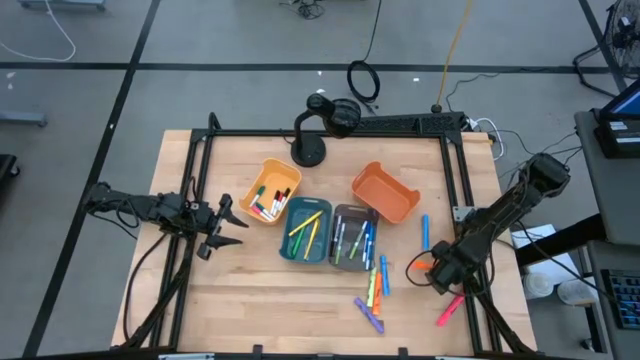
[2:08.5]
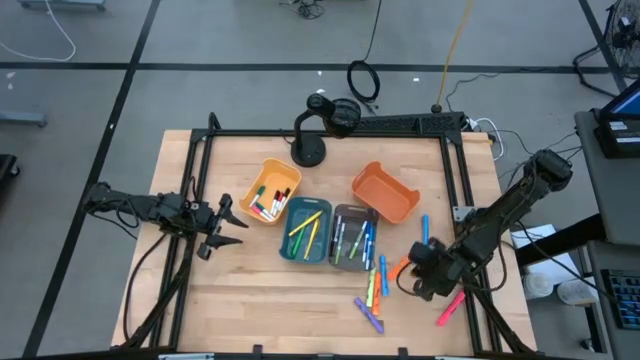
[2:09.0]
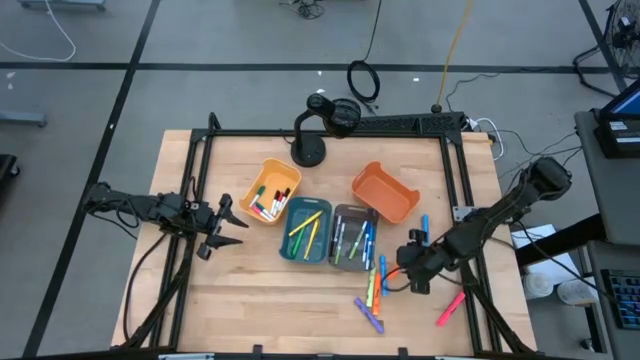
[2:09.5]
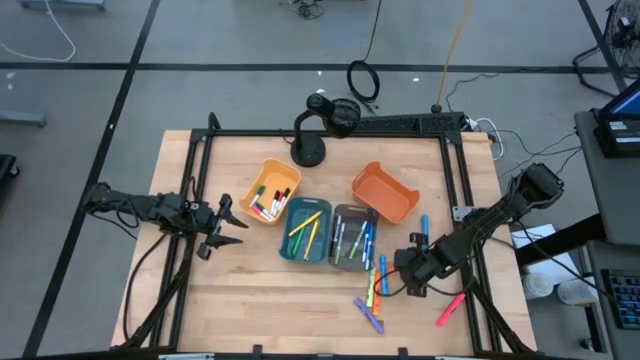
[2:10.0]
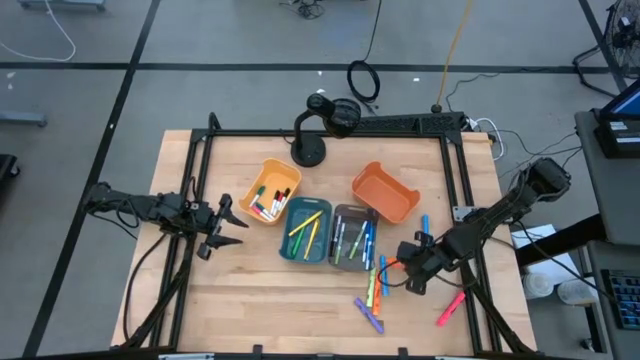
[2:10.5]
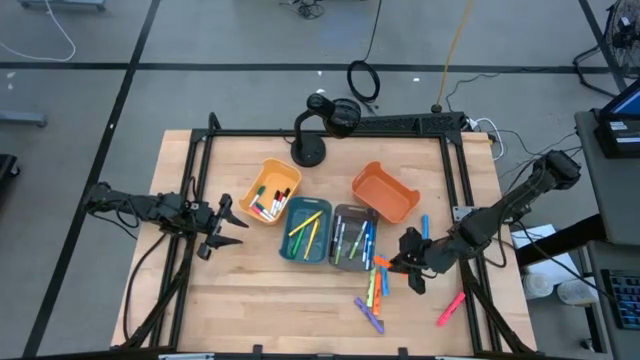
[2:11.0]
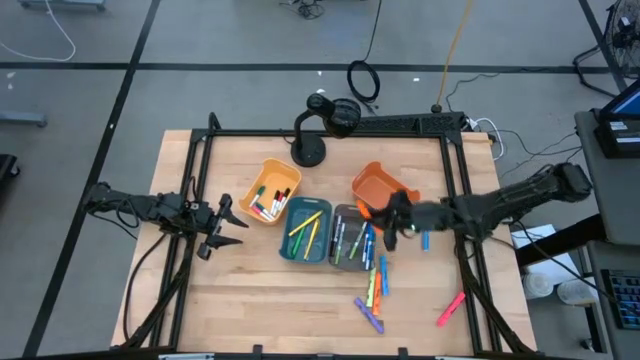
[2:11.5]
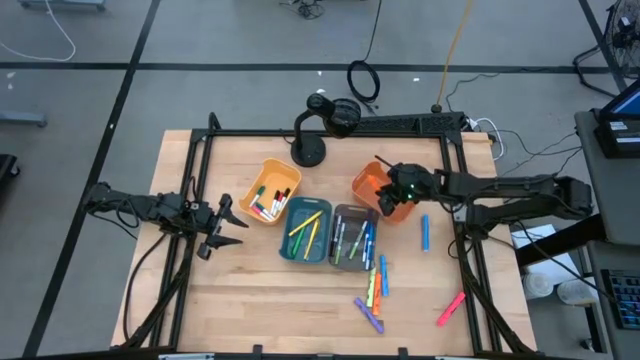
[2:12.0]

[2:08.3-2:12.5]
Task: Pick & Place Markers
Put the right orange highlighter into the orange bin

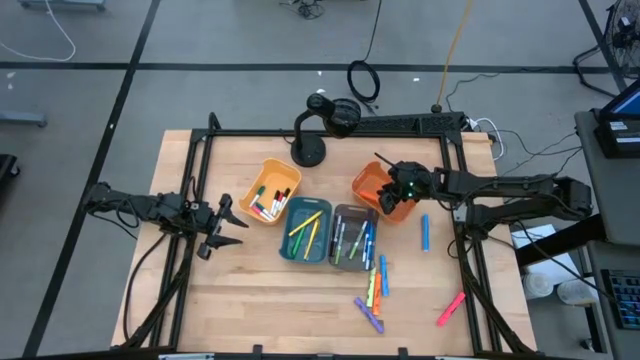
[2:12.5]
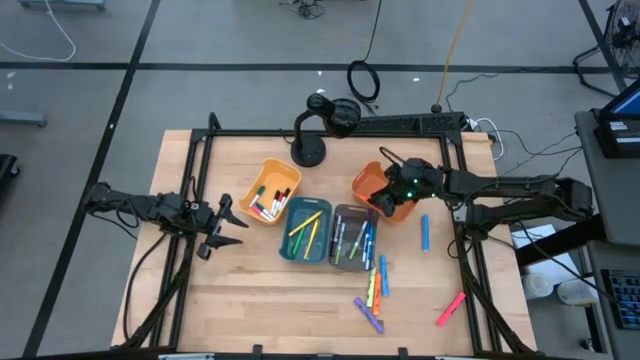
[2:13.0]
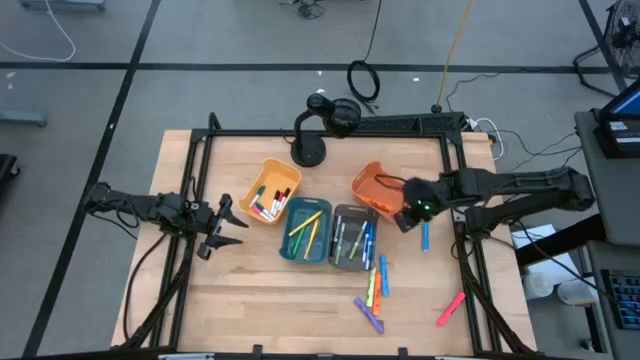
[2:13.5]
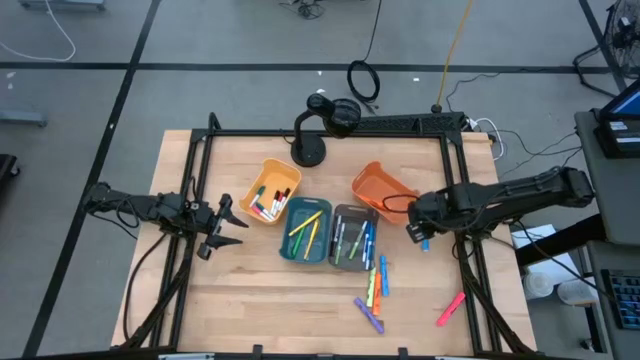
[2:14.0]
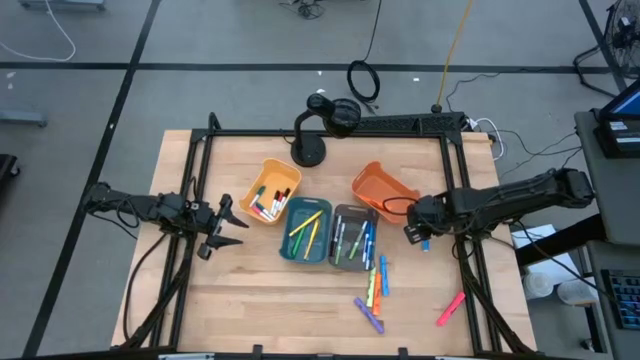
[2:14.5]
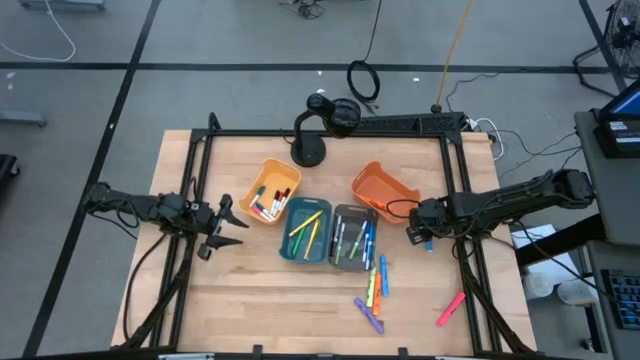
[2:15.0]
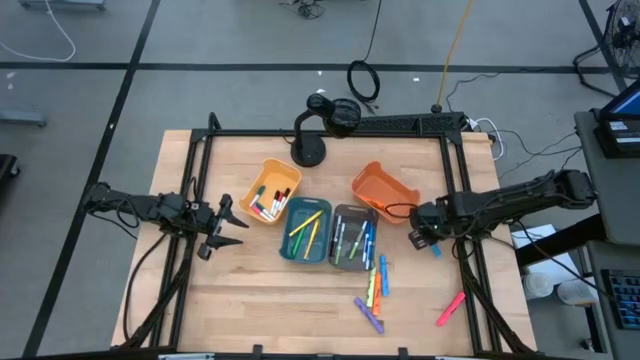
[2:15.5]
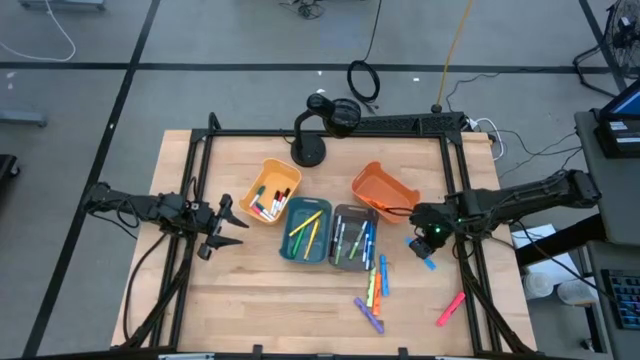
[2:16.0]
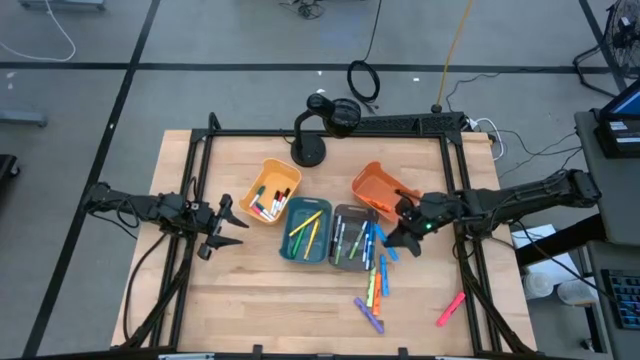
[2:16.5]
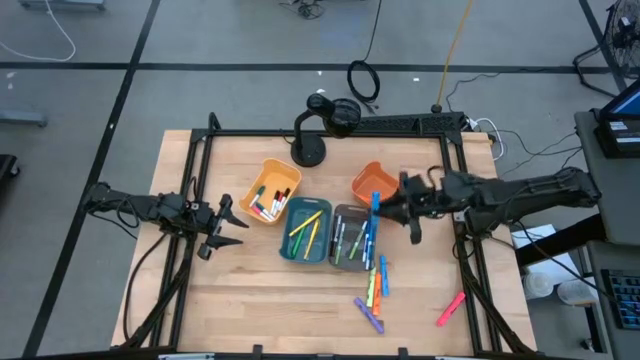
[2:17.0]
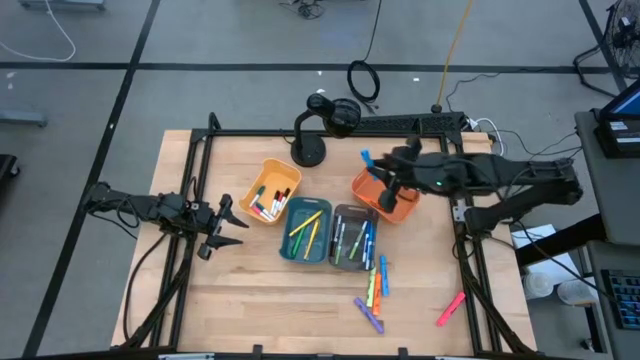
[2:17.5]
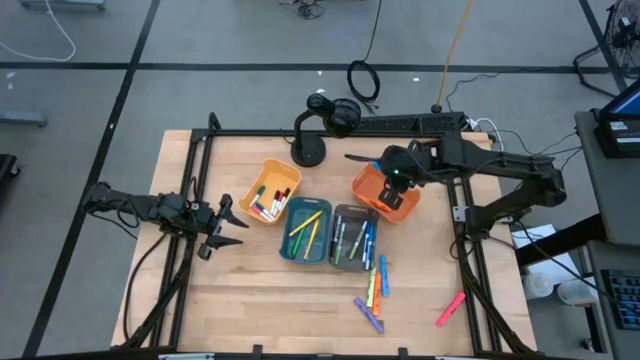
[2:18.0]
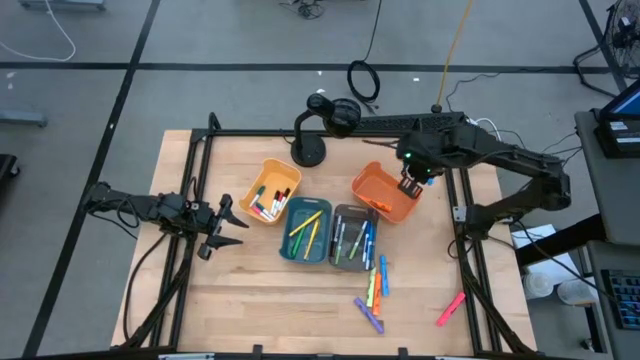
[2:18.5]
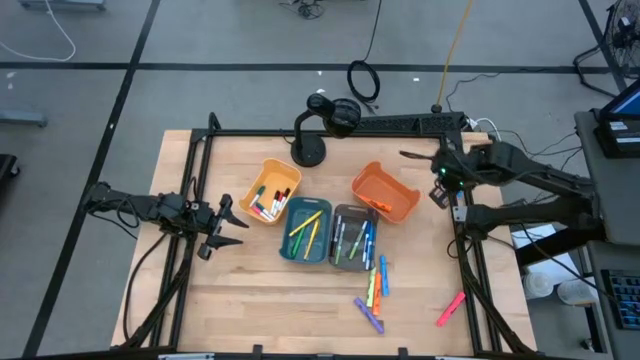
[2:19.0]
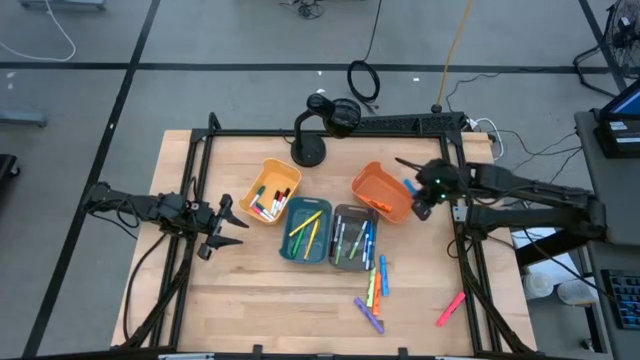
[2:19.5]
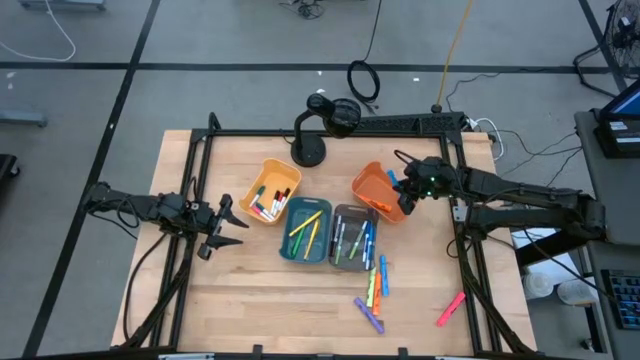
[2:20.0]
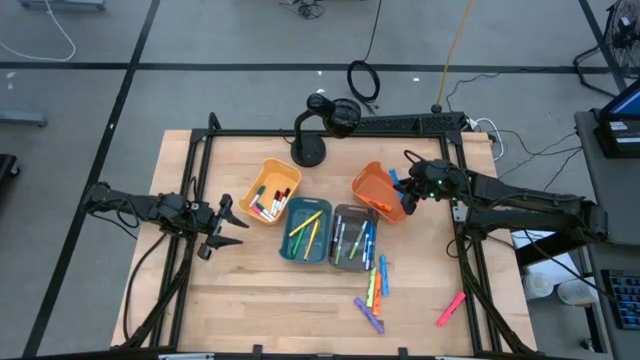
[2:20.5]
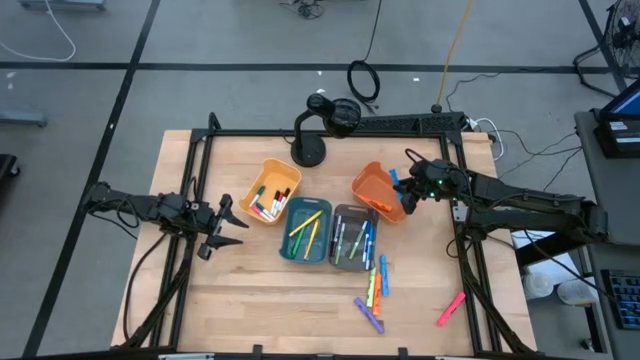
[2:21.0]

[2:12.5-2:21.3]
Put the right blue highlighter into the orange bin

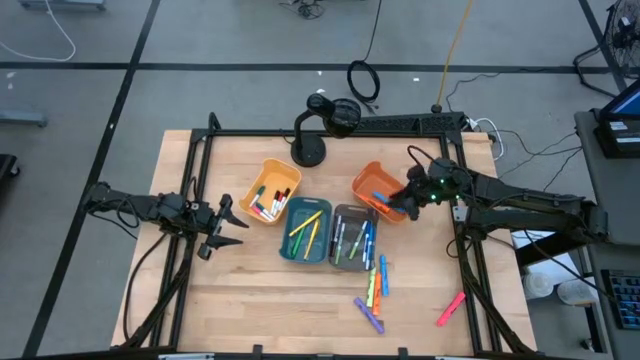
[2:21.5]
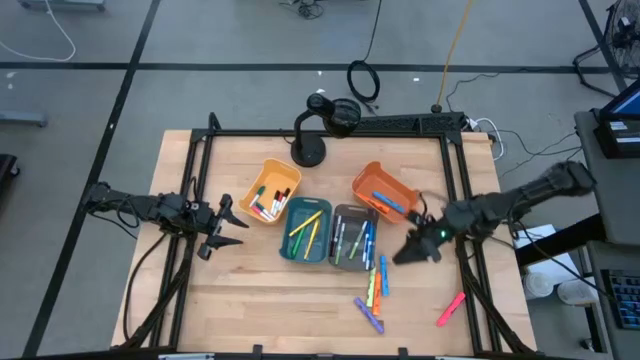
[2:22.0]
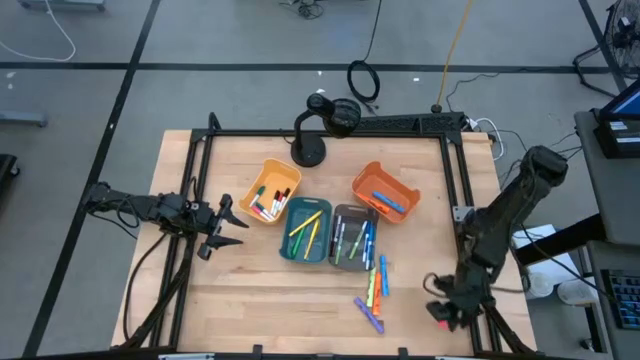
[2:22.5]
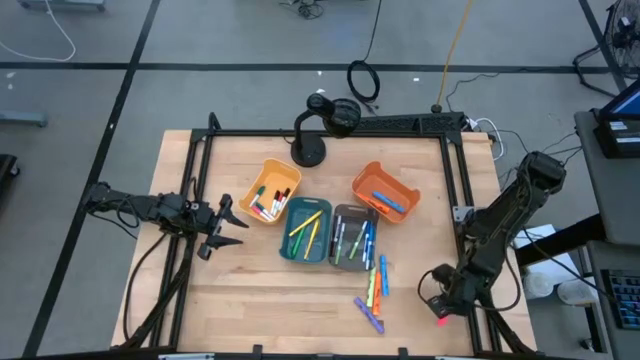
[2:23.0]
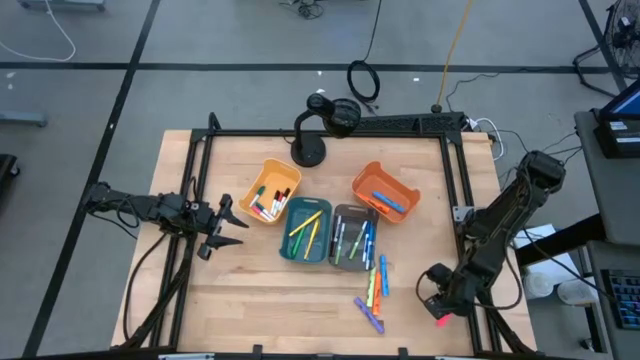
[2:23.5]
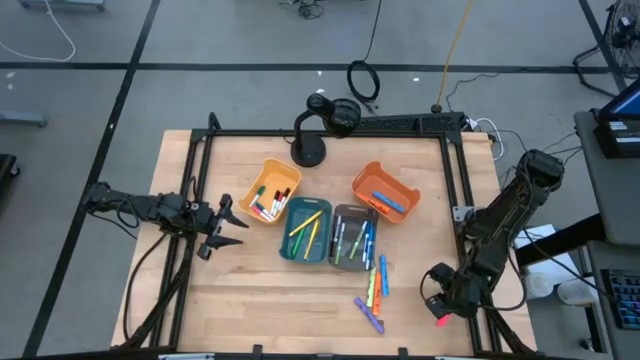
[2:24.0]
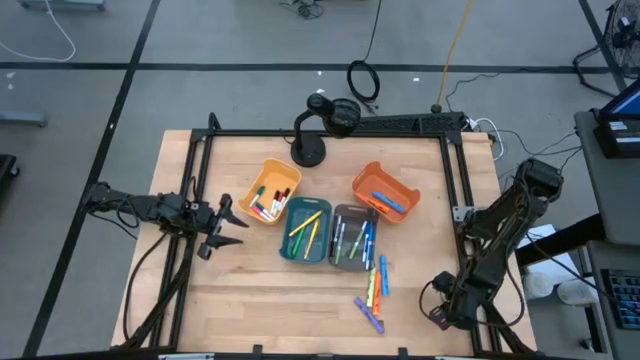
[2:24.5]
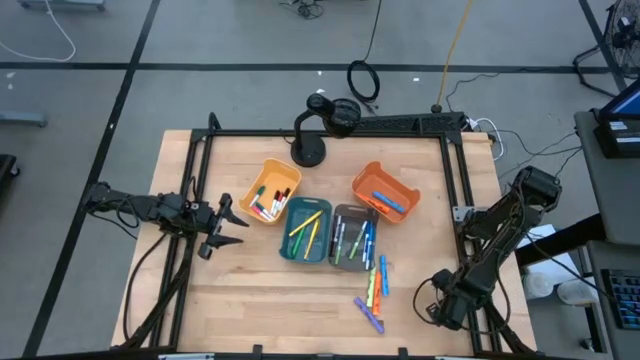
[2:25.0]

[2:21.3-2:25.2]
Put the pink highlighter into the orange bin

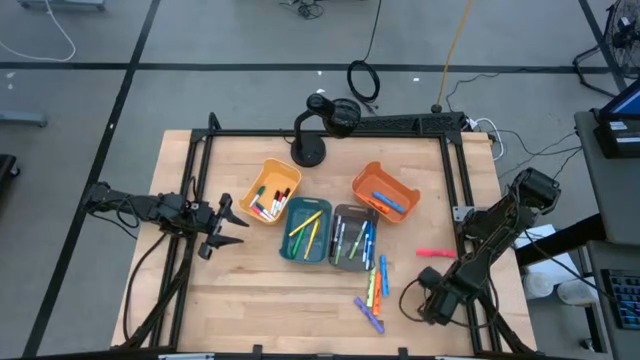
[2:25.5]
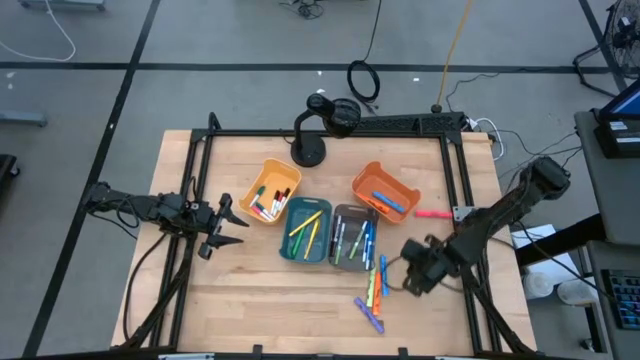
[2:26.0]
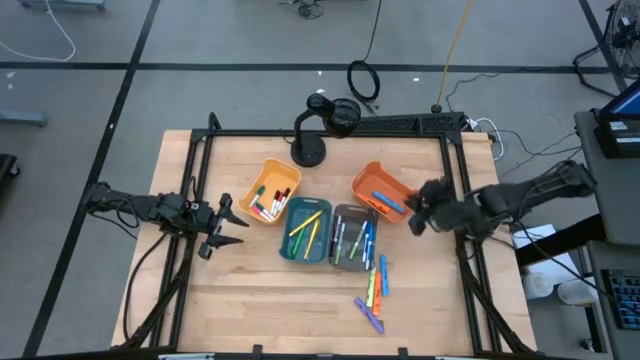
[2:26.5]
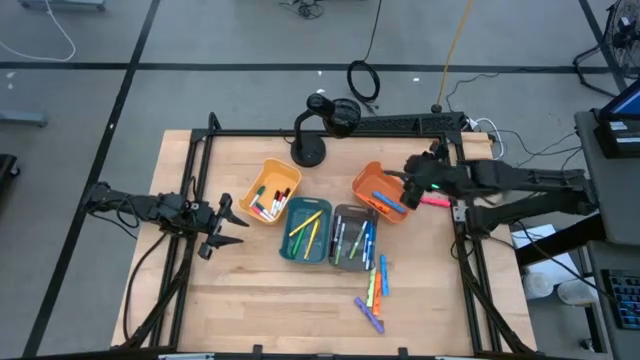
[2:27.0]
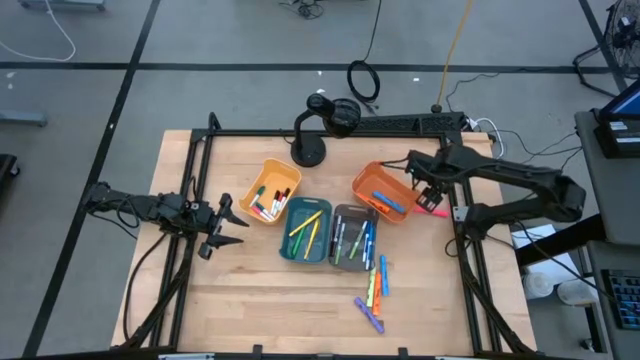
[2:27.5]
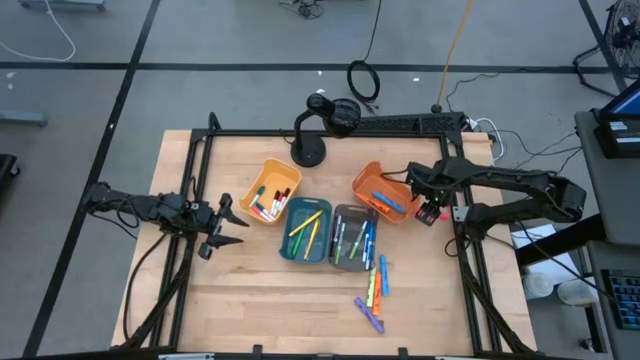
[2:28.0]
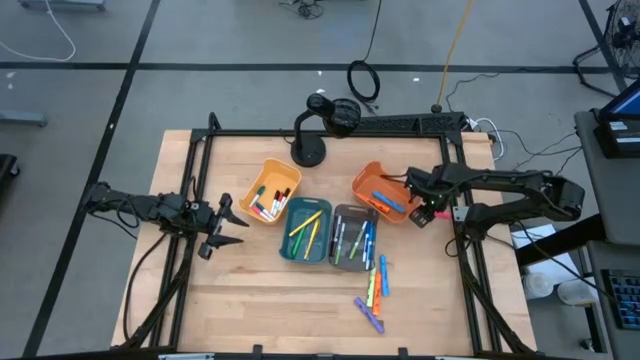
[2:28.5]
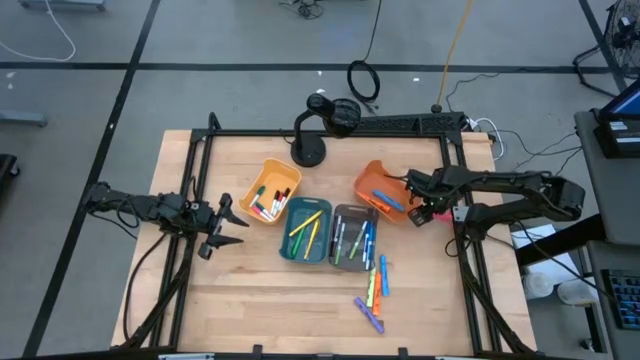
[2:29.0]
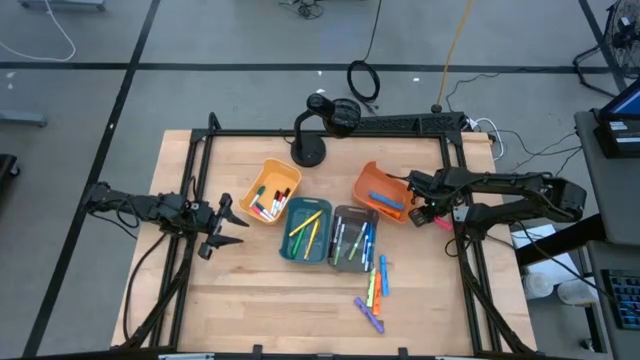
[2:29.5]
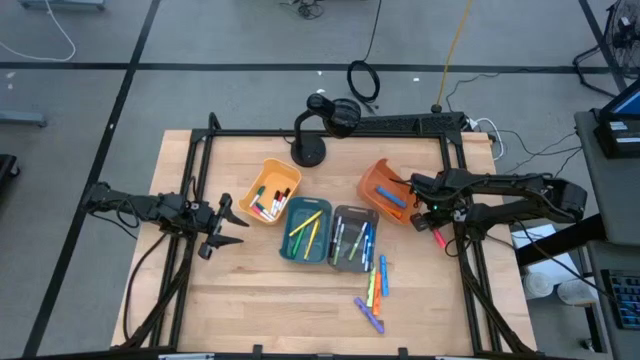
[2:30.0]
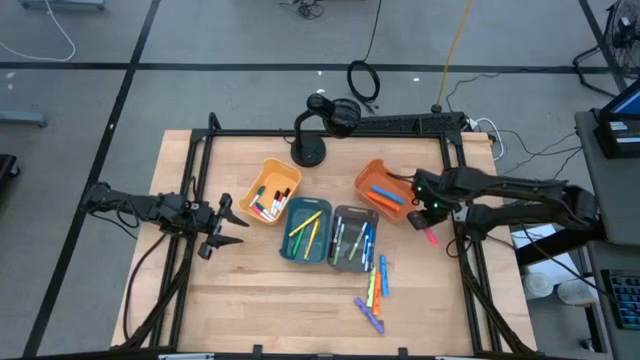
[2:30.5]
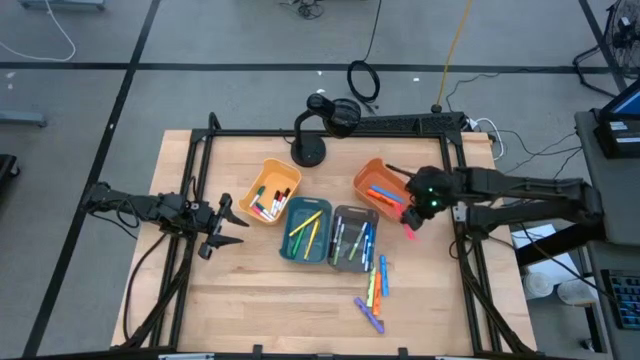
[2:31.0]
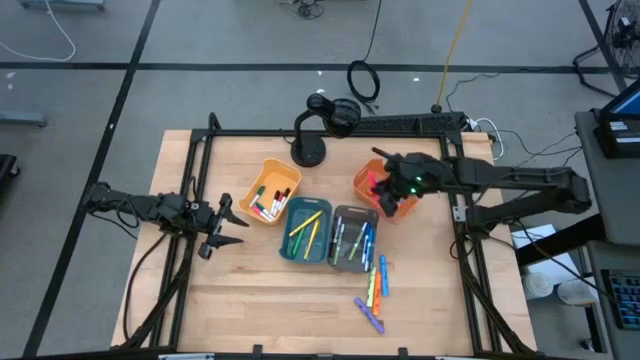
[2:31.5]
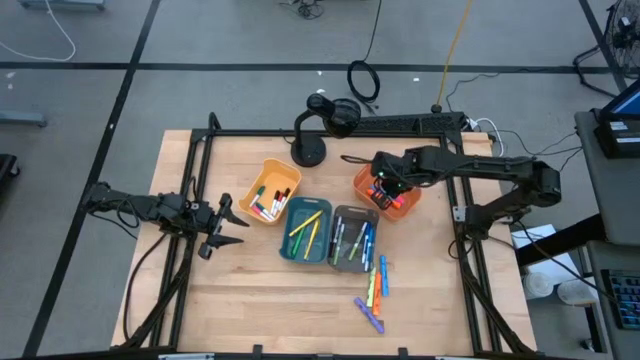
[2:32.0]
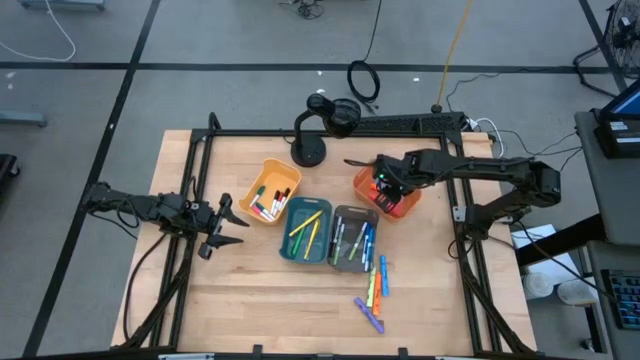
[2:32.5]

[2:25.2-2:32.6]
Put the pink highlighter into the orange bin
